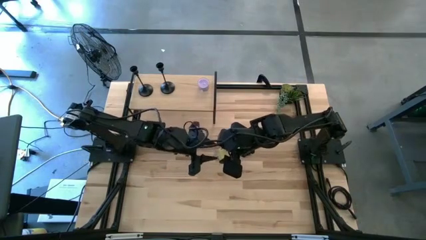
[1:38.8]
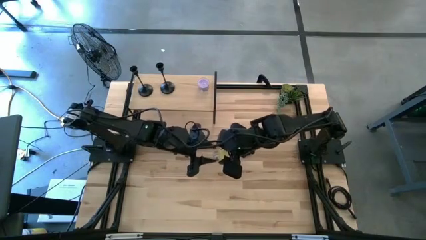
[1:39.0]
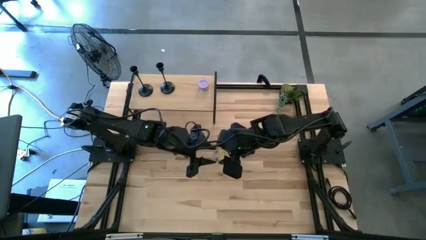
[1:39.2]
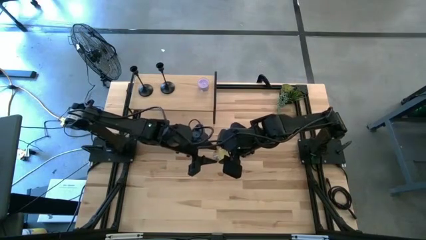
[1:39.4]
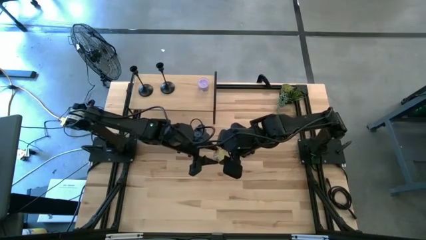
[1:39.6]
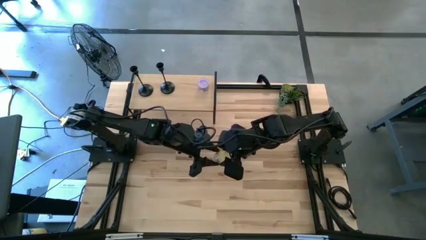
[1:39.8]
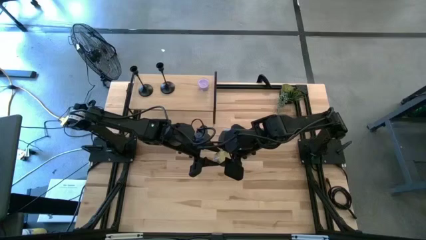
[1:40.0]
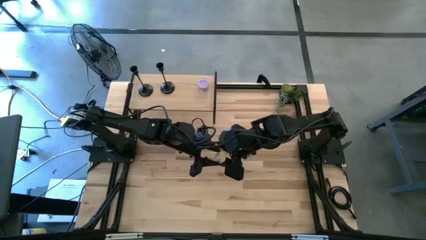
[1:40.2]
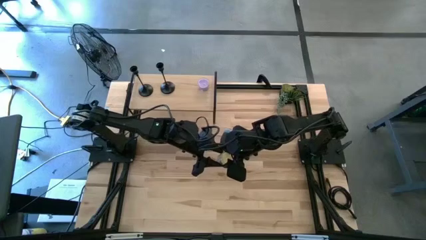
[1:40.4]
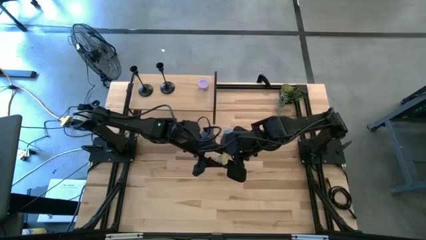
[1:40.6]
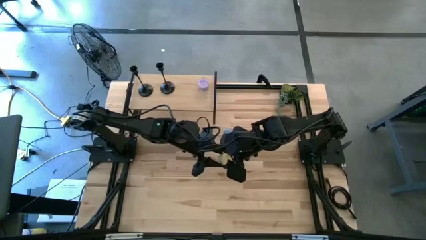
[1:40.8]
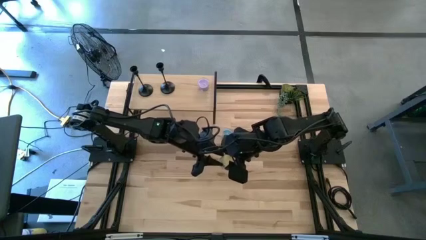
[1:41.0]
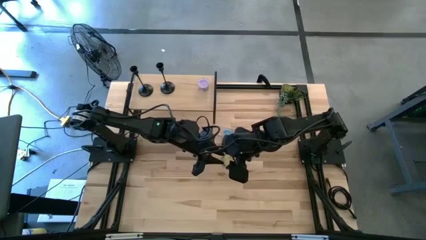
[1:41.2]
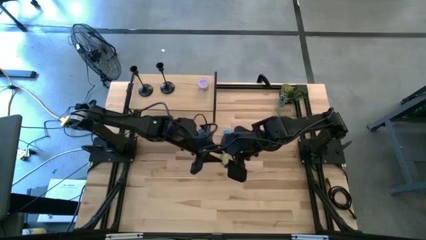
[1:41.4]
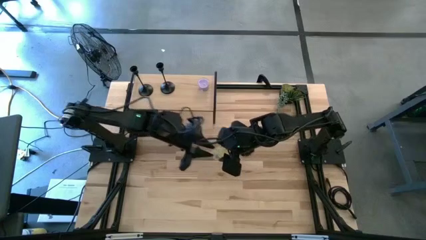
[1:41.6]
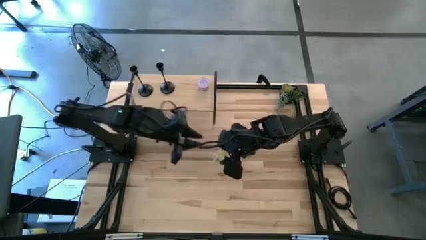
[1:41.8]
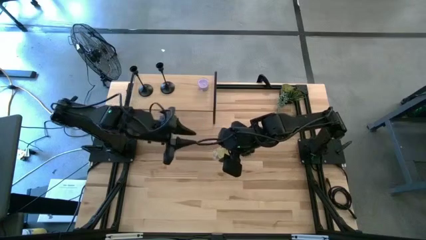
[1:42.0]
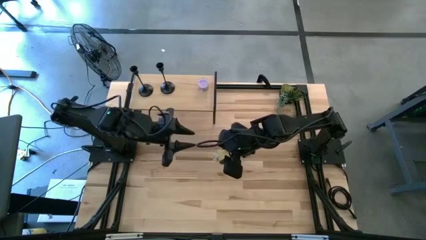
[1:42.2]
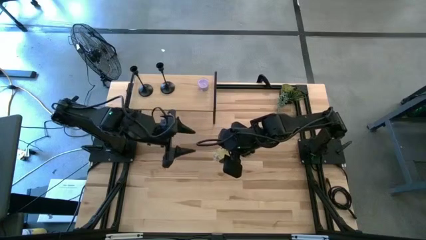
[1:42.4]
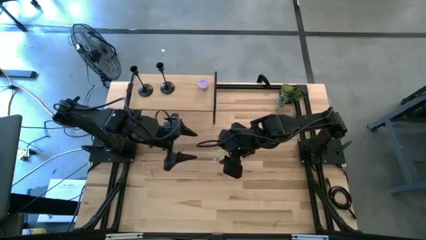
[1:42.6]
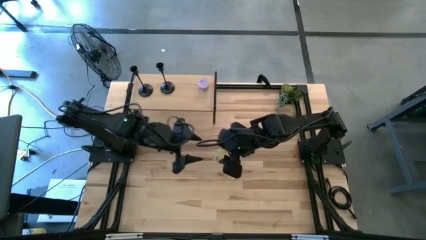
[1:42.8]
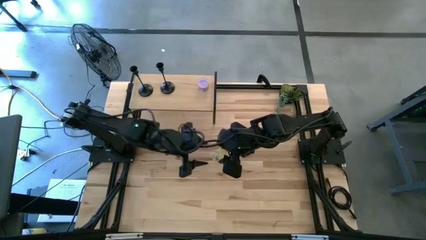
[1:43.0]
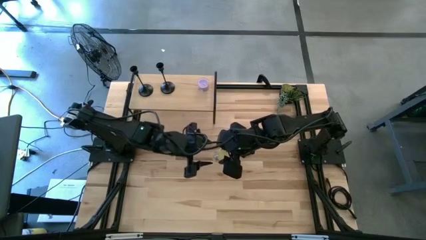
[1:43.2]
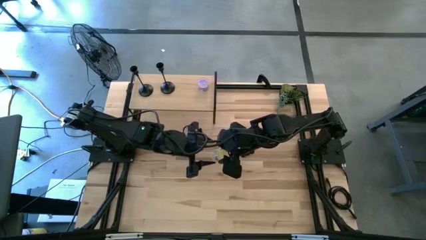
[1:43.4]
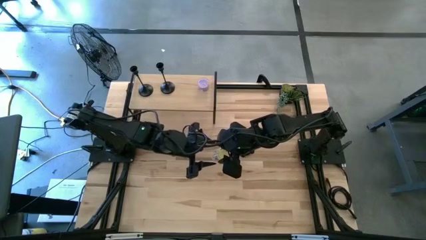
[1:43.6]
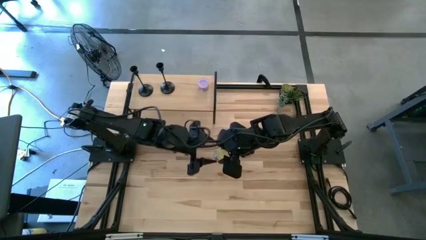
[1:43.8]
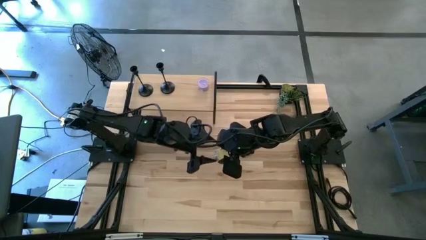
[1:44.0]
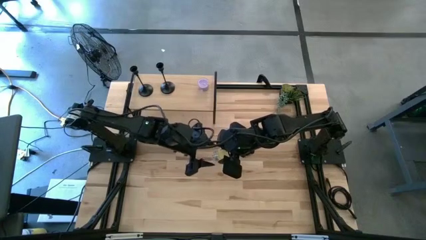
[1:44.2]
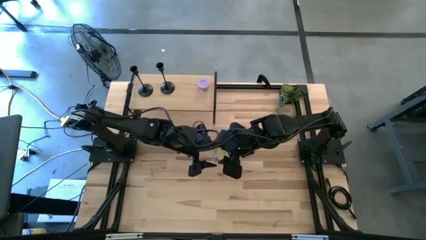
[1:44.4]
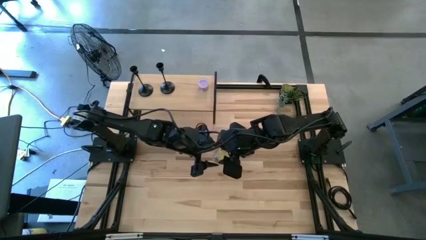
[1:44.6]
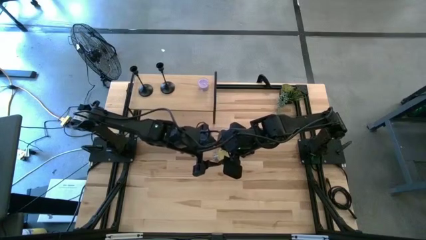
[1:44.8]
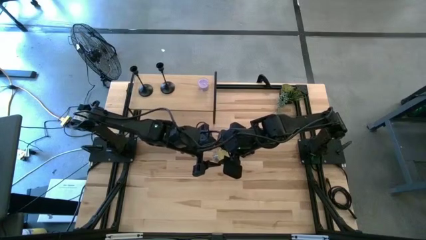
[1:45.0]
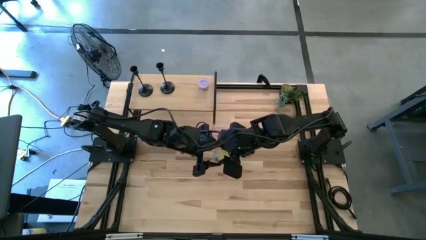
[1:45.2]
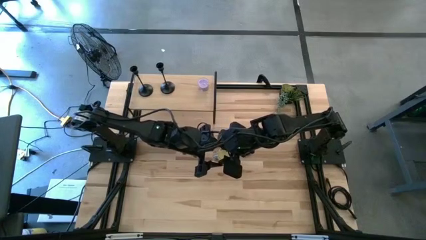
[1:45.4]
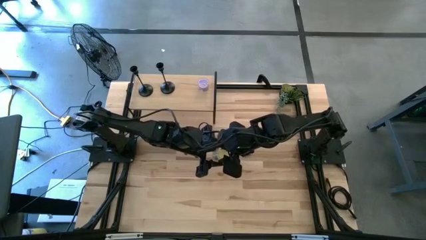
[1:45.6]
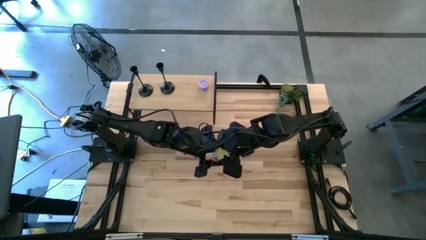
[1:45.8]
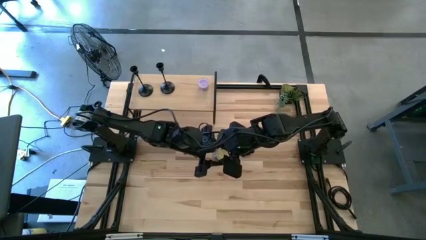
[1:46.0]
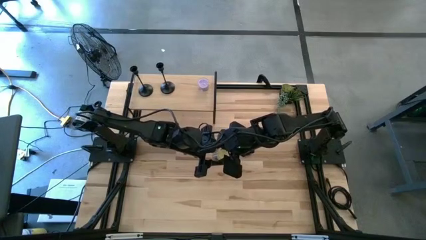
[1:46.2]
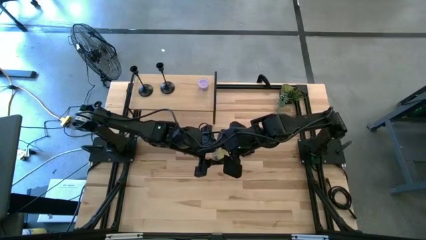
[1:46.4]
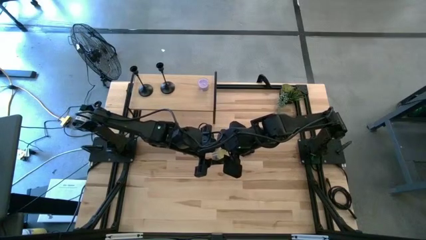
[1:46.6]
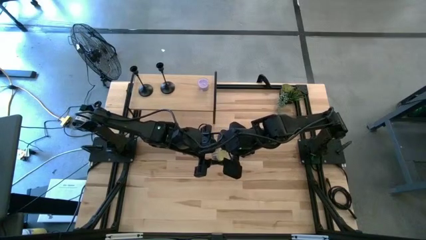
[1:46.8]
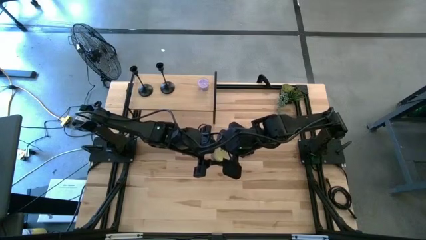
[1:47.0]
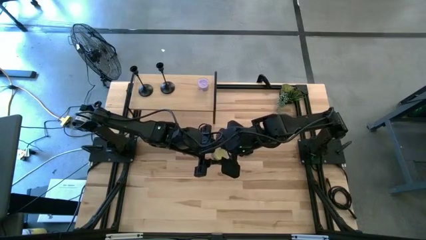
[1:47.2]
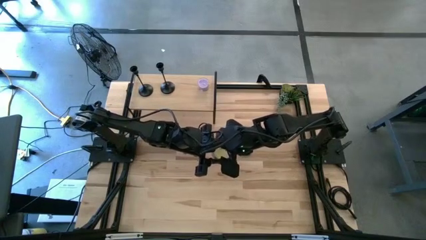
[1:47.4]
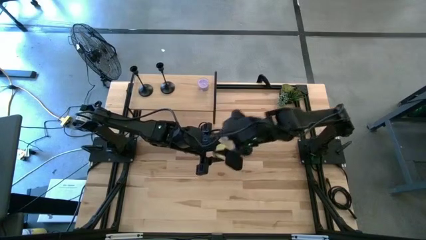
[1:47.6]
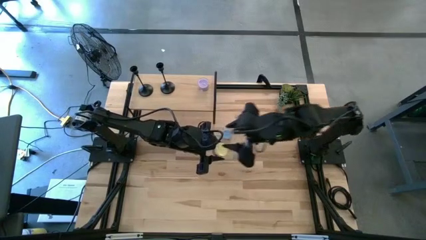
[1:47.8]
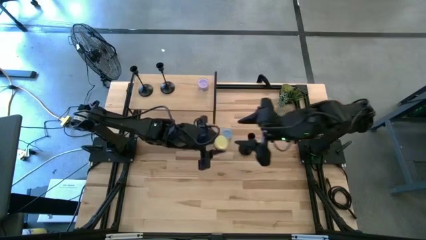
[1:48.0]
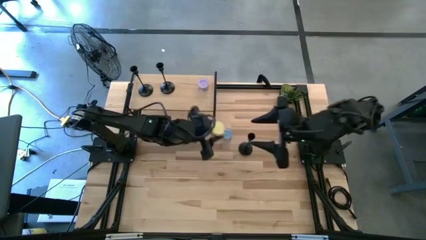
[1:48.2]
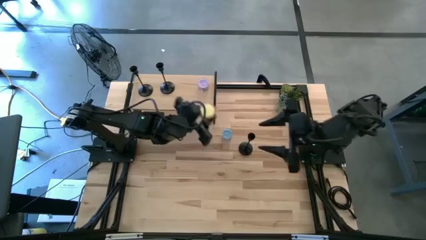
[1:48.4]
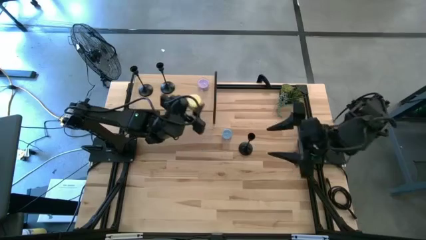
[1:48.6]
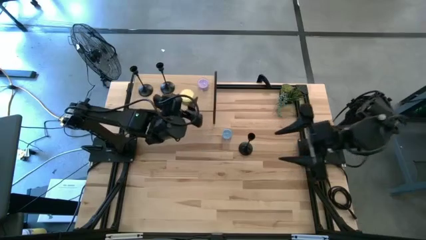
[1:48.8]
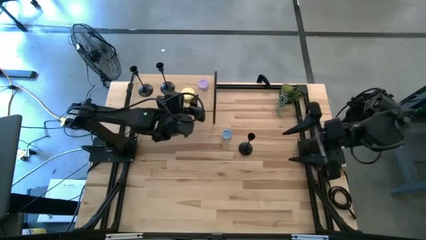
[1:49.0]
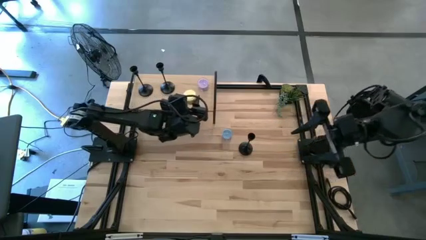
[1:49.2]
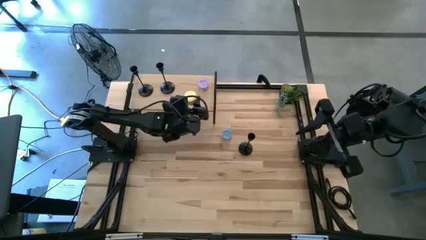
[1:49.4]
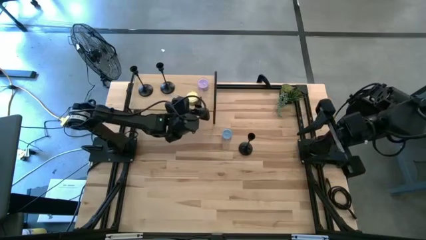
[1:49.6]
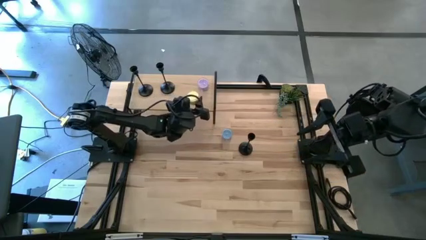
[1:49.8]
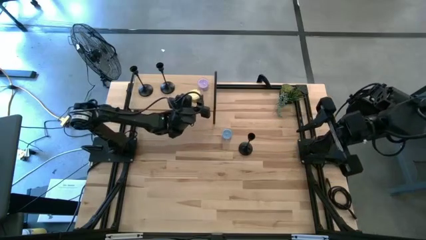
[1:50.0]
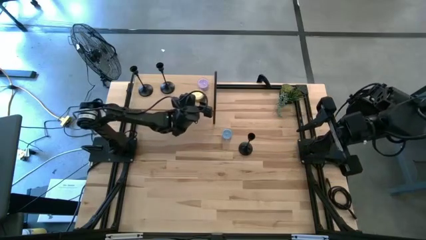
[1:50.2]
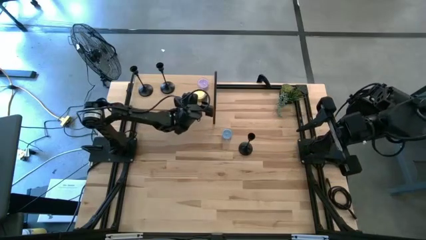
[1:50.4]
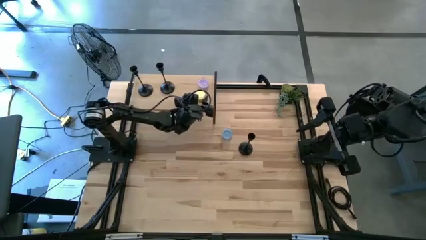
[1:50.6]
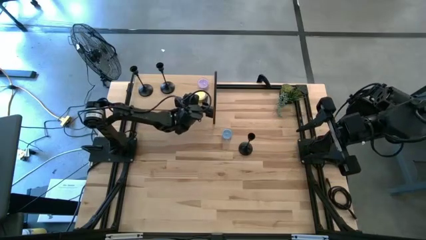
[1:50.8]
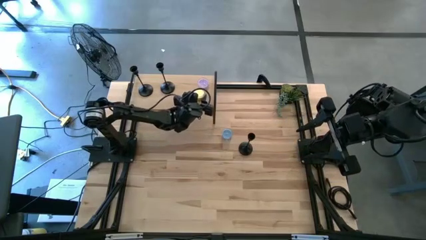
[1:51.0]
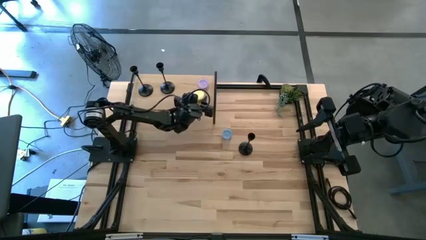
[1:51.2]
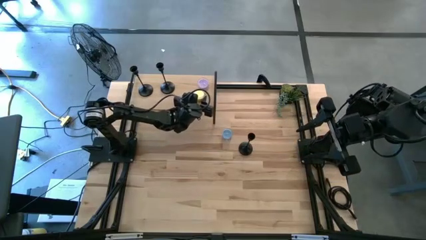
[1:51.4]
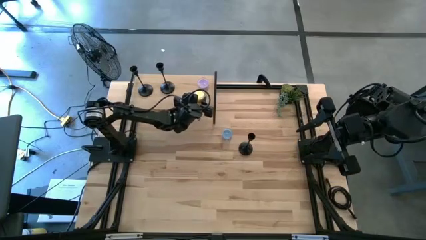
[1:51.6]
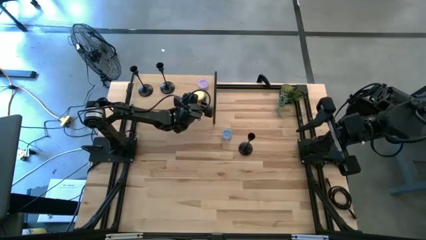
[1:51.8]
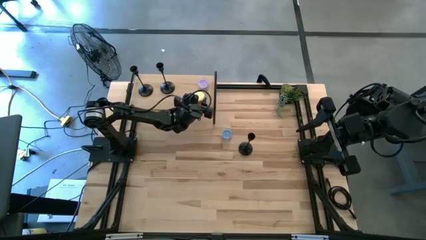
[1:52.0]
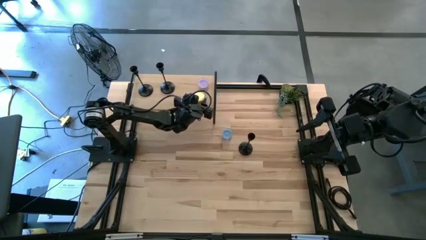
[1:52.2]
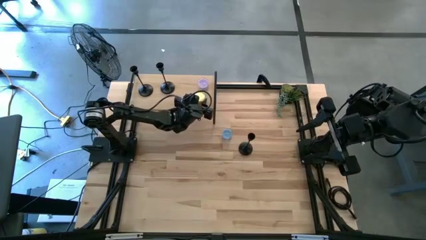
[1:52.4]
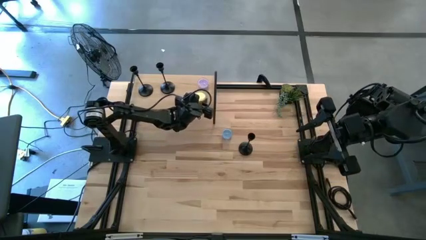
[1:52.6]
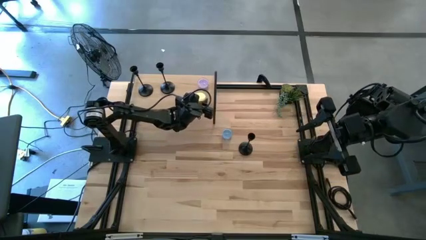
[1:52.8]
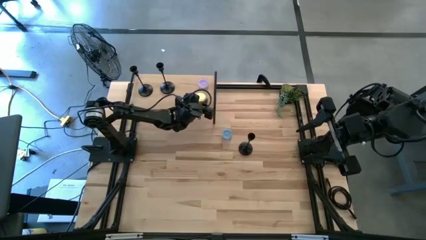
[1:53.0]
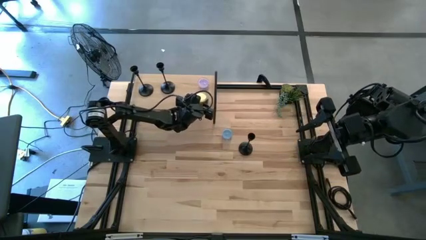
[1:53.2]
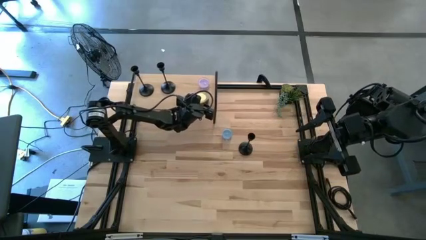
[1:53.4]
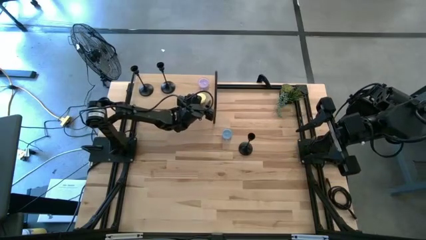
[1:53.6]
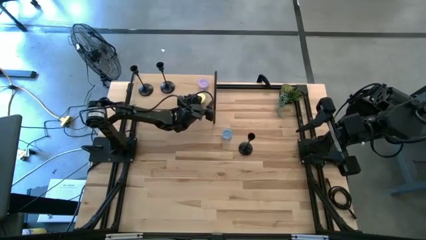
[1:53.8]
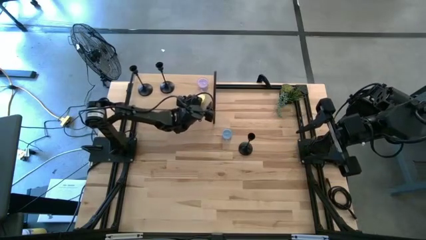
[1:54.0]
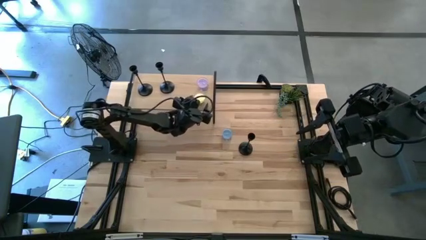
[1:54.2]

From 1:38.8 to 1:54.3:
Task: Pick & Place candle stick holders
Put the yellow candle on the shelf

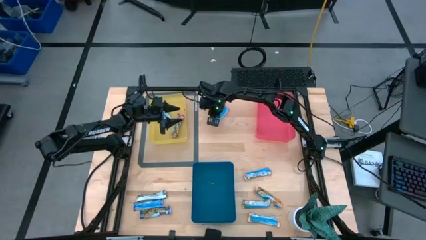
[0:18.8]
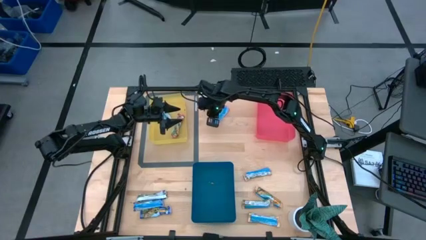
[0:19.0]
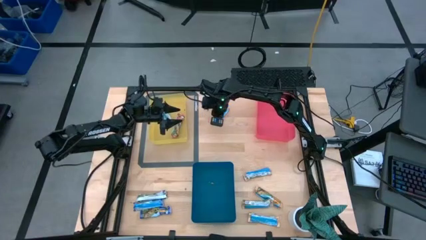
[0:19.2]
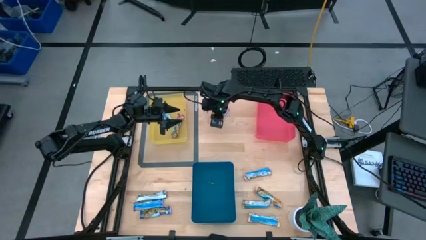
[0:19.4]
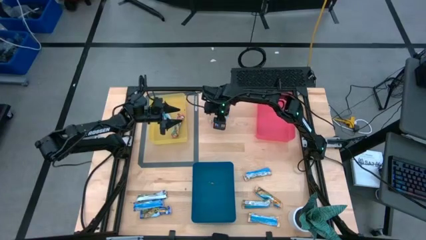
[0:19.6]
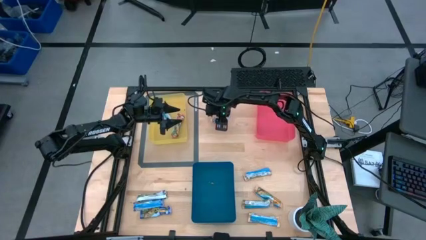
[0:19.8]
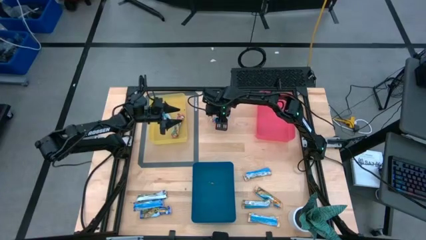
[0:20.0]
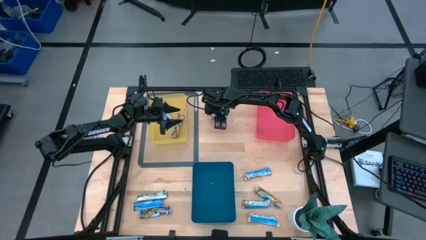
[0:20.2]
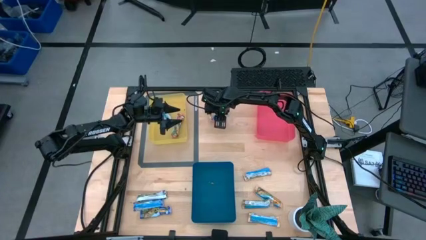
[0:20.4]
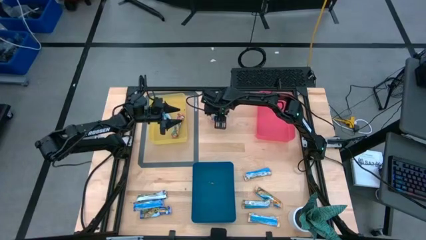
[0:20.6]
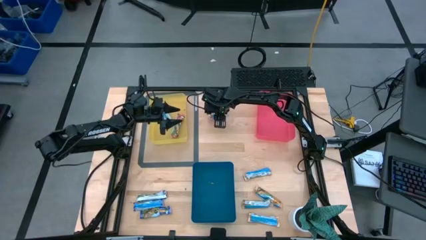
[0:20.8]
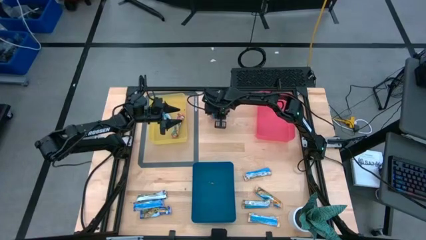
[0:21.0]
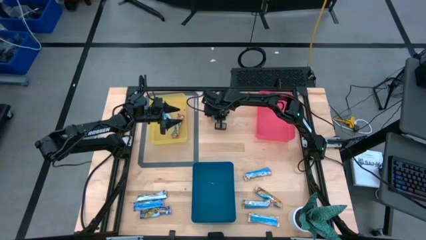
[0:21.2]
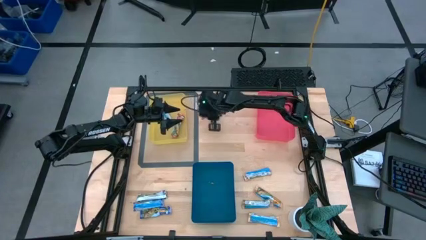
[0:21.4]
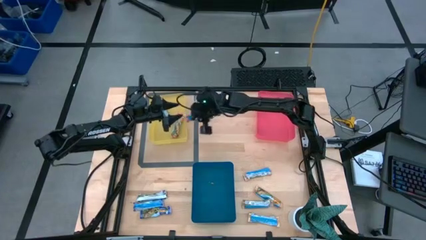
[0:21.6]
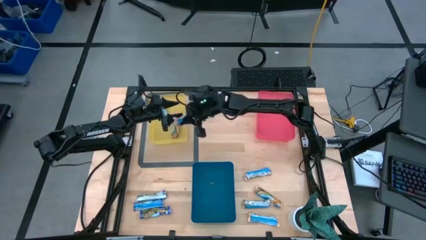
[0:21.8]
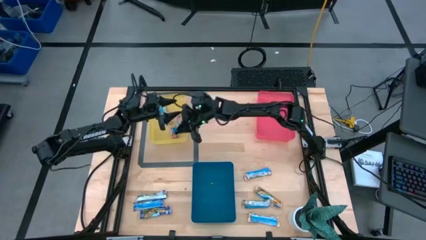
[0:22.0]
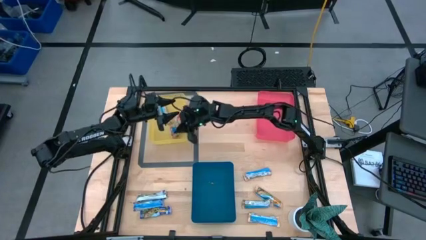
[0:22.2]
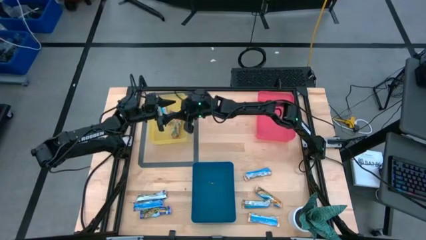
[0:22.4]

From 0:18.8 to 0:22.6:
Task: Pick and place Granola Bars by type
Put the red granola bar into the yellow bin
